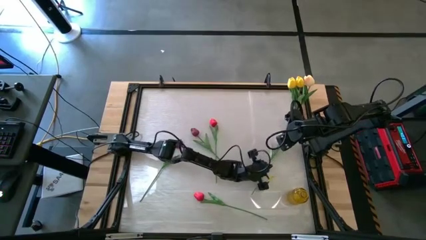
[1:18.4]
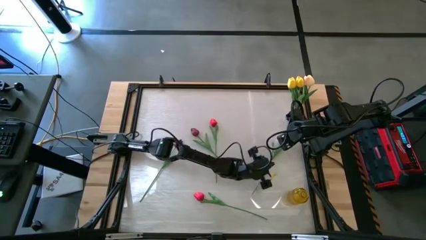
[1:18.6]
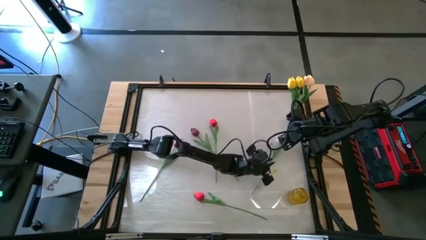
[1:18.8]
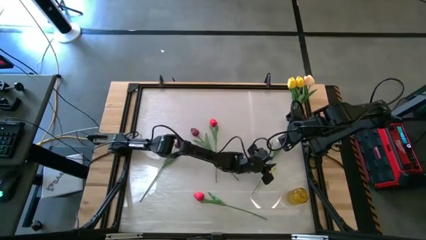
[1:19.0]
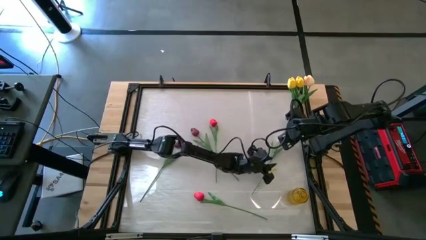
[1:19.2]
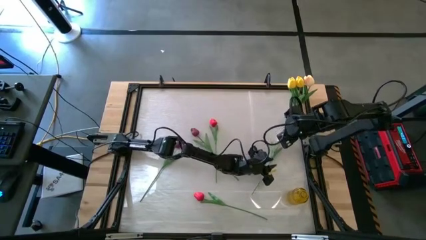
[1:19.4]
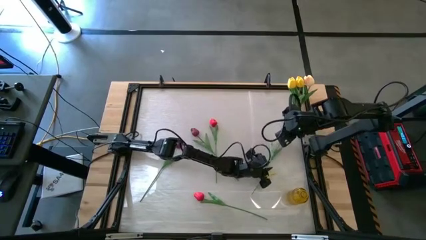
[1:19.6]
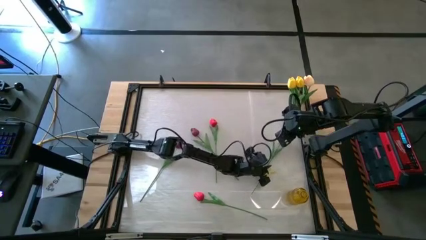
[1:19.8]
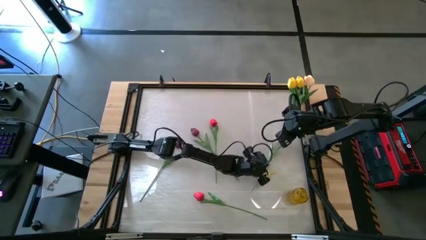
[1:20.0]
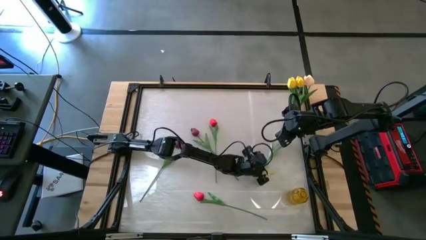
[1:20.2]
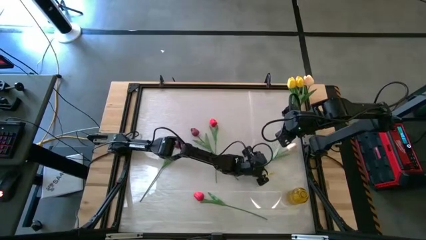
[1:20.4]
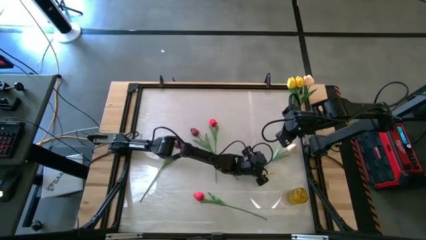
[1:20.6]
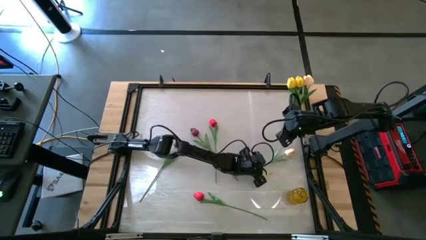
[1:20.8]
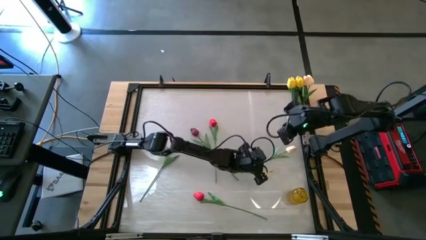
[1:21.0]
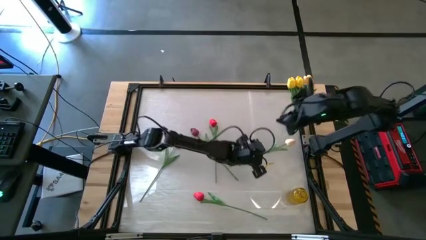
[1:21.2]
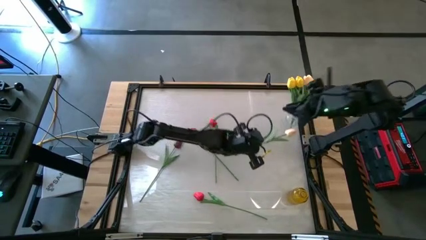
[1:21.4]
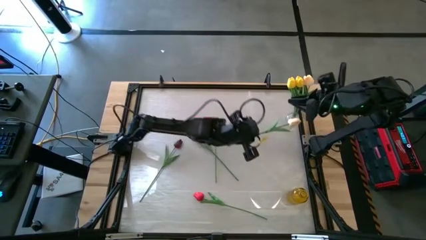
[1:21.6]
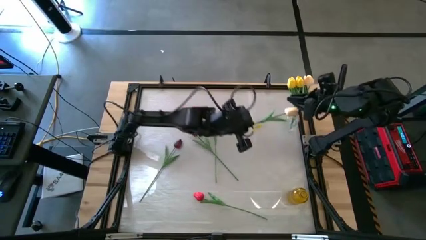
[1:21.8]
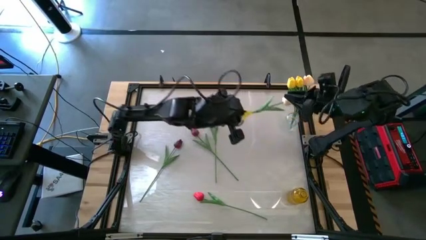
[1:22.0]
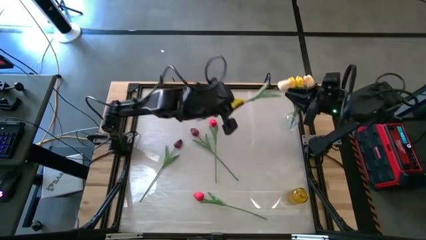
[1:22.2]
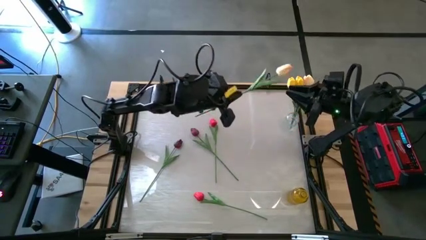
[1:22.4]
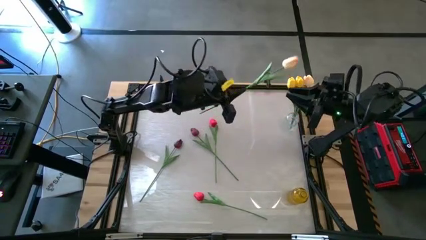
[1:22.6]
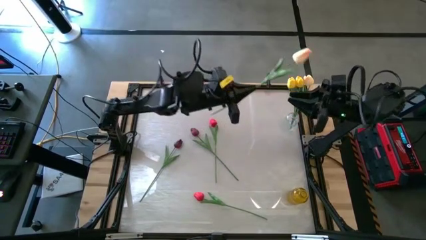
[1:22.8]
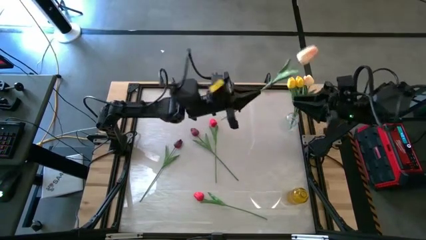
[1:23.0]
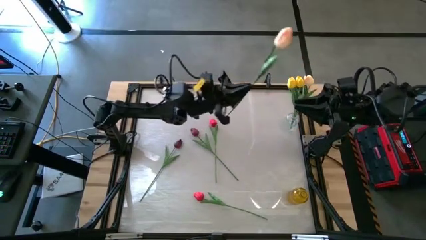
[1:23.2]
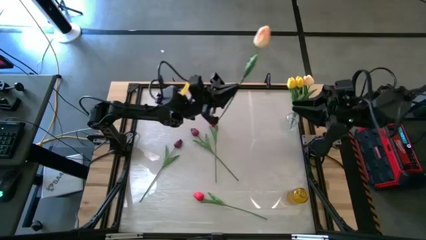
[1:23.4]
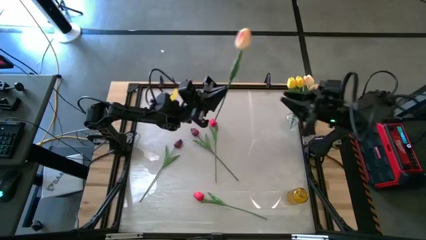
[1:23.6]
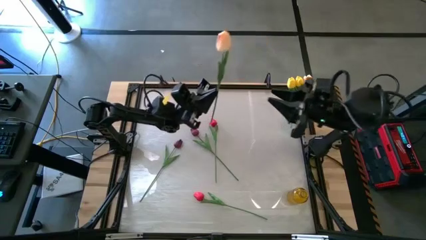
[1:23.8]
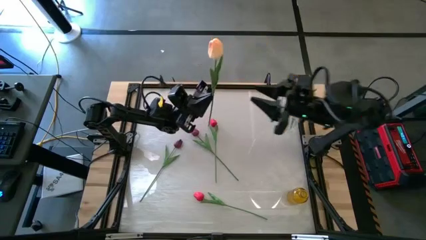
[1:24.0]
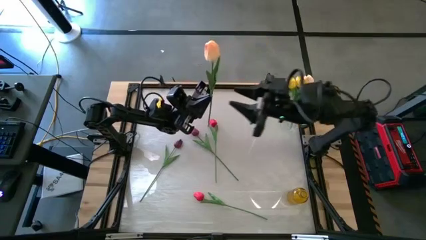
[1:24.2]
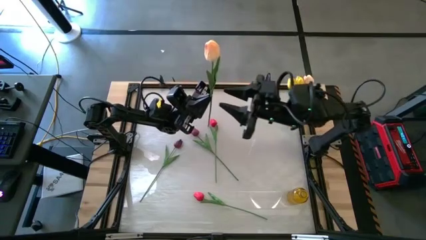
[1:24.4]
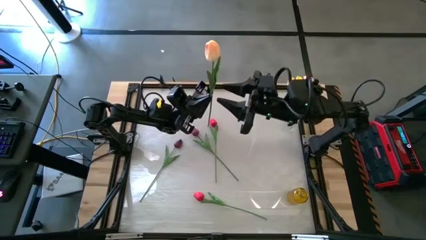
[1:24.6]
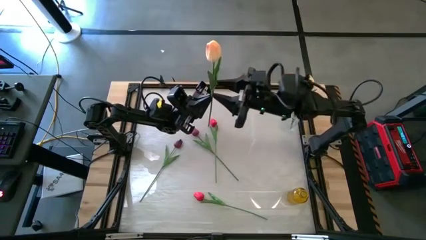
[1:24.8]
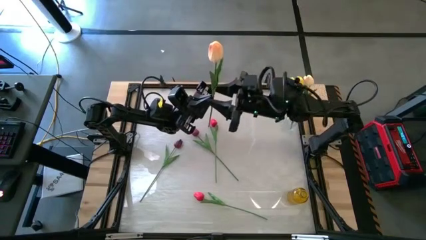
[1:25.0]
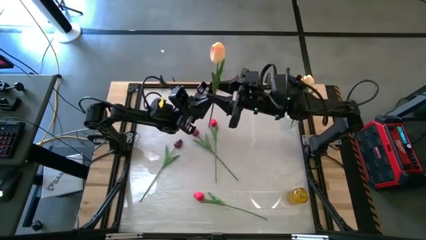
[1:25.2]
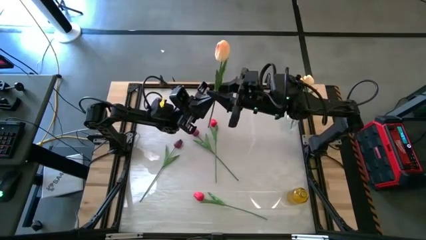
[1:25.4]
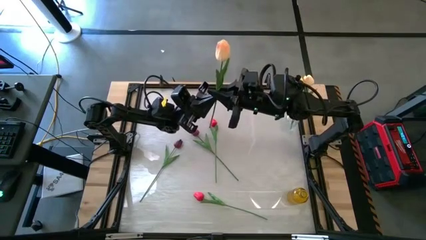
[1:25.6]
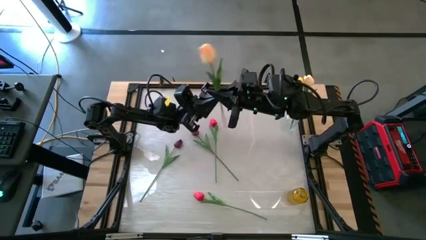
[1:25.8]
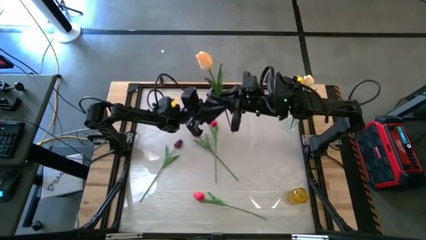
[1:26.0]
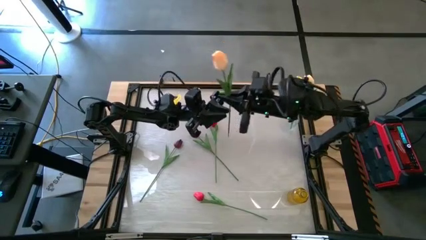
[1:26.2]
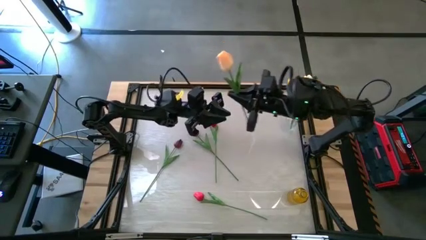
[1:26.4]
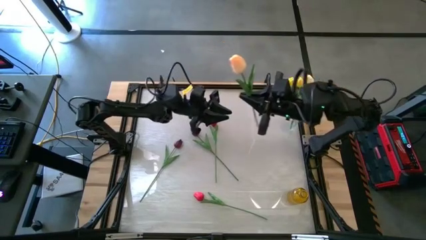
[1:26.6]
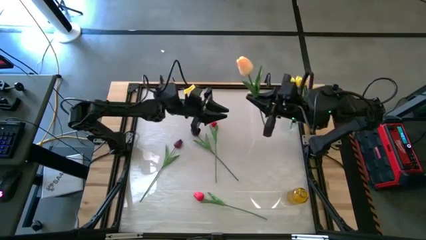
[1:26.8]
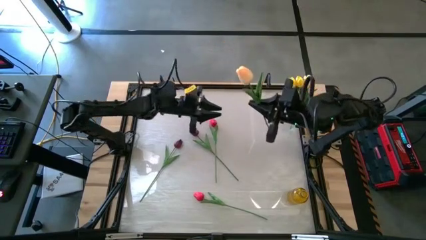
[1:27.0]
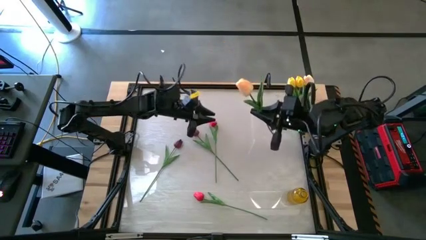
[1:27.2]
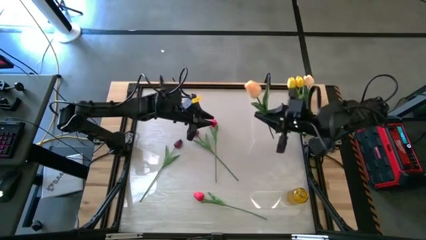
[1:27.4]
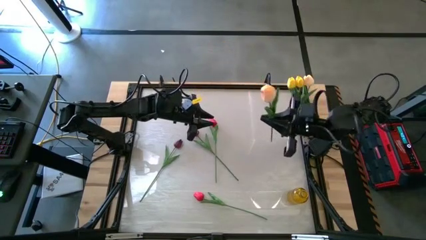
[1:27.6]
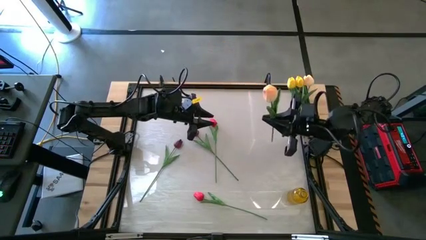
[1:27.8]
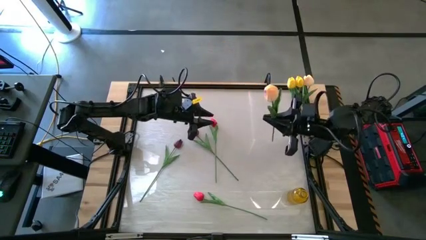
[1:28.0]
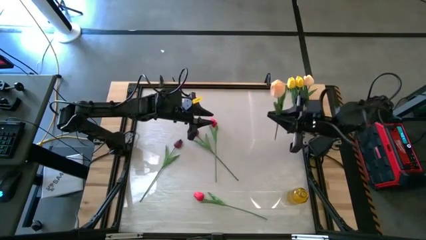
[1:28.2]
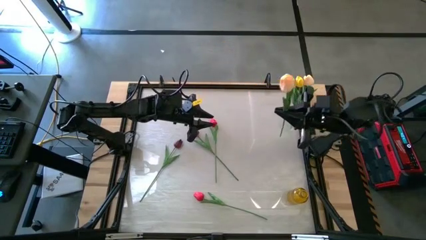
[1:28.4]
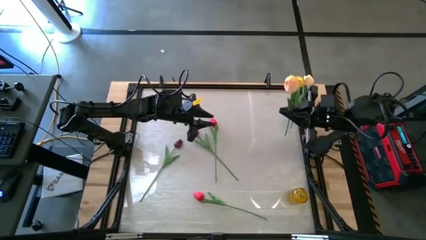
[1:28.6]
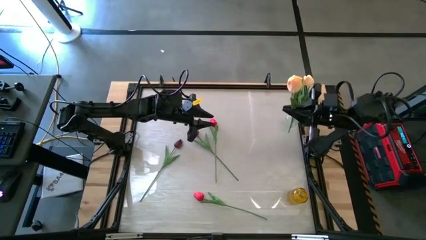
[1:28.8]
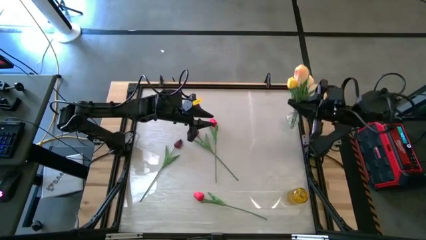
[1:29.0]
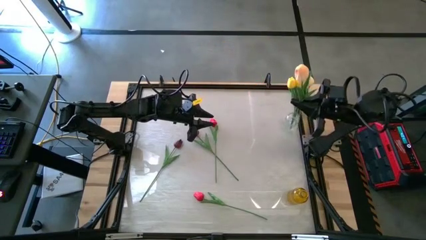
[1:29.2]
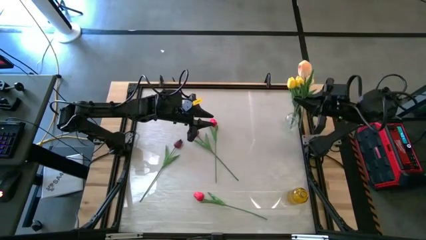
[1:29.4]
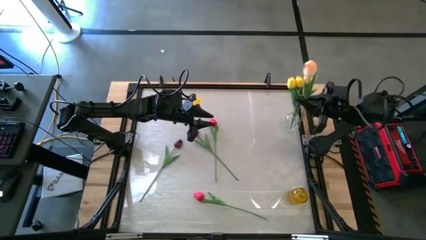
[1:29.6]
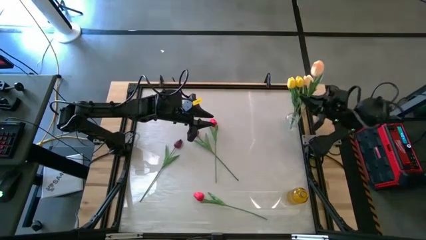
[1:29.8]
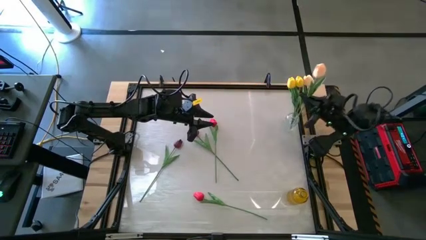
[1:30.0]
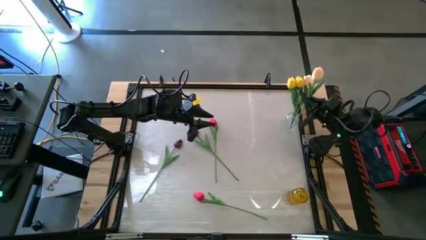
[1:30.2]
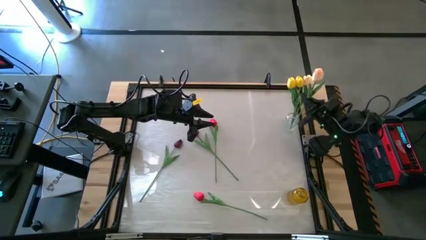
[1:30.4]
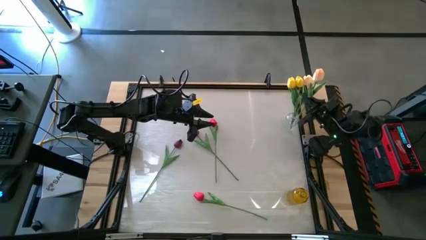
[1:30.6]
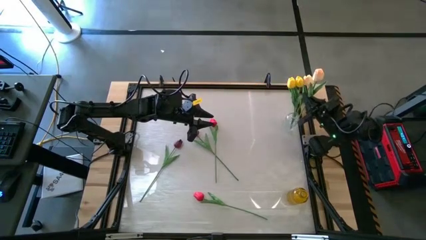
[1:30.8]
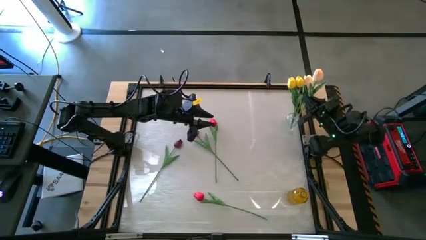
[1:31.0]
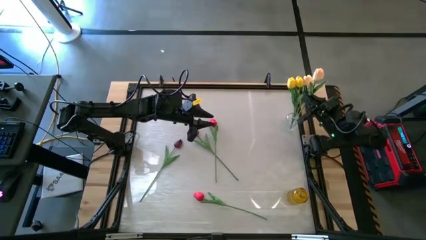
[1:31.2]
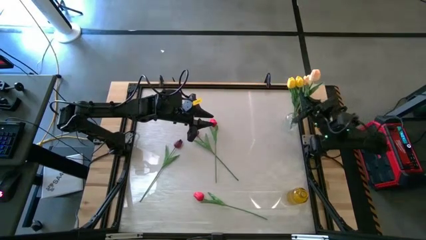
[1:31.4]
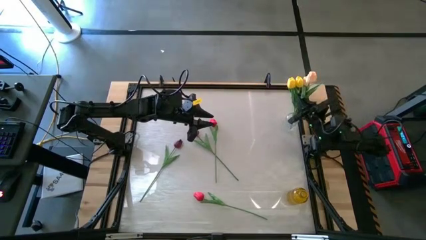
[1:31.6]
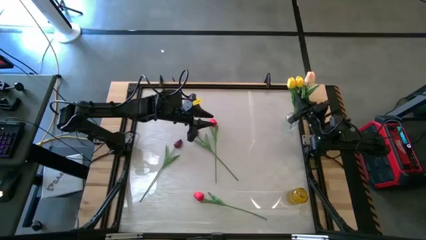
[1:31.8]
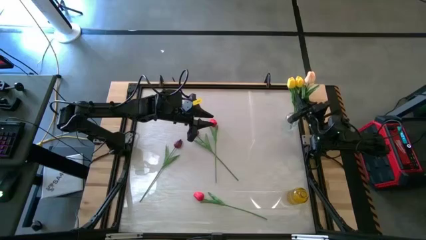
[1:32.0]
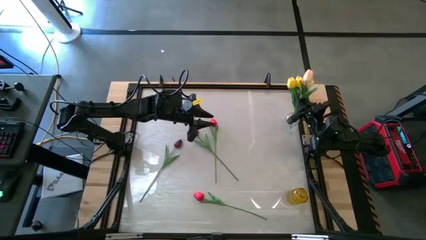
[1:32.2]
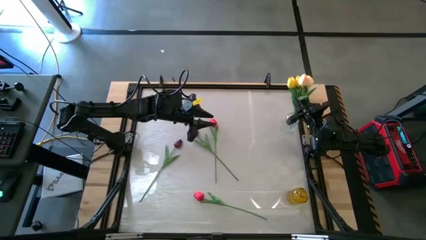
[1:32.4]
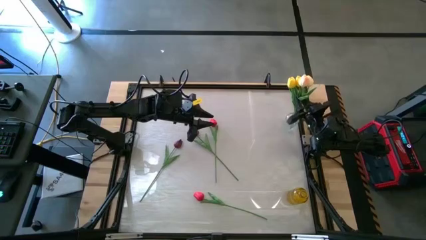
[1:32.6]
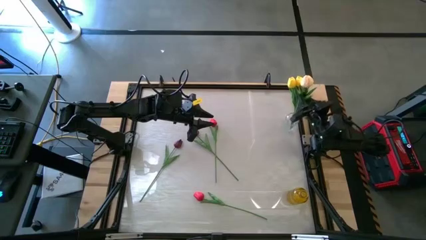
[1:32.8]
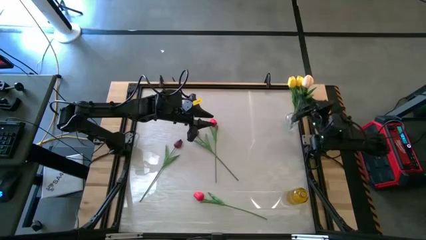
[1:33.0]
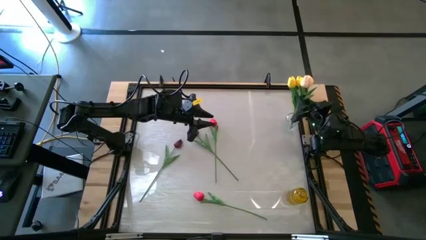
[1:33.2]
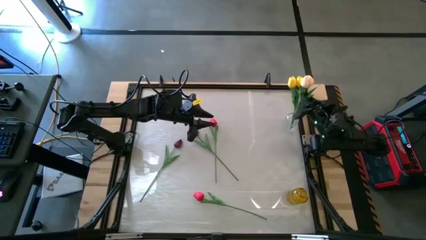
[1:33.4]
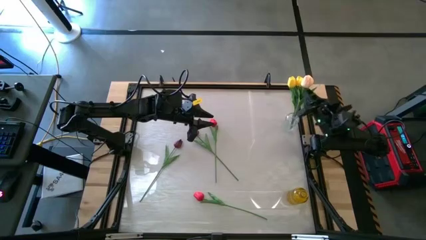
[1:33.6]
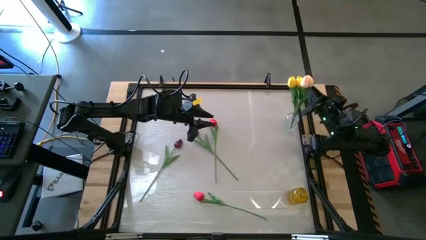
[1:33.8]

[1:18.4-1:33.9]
Task: Sort flowers into vase by color
Put the white tulip into the transparent vase
